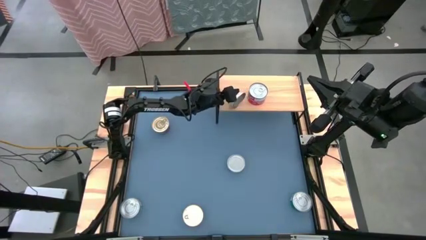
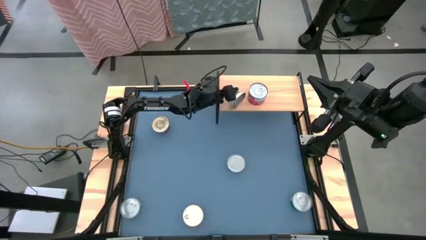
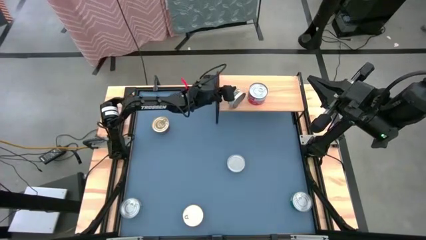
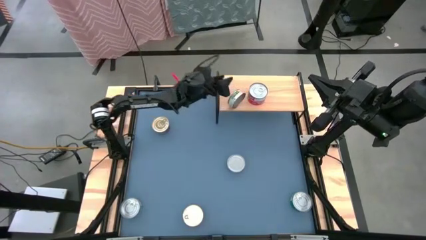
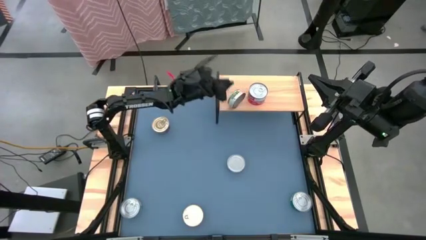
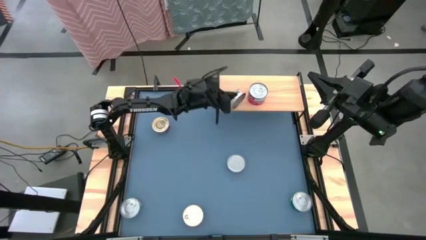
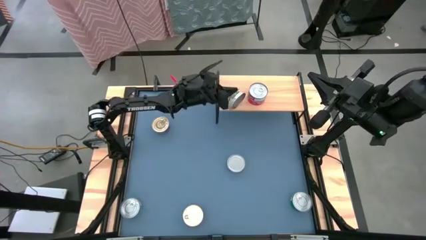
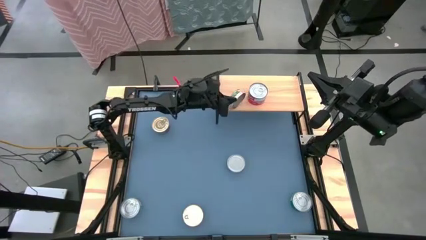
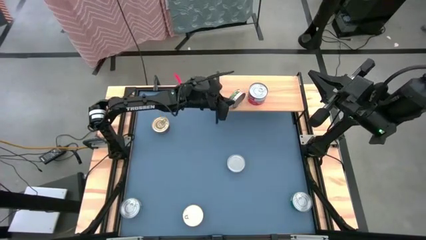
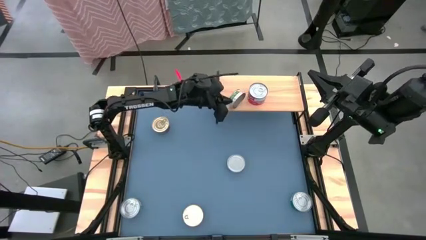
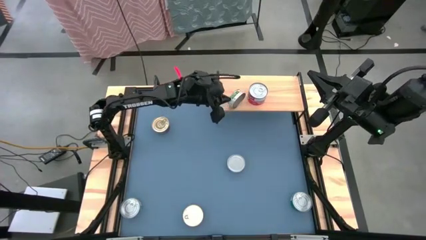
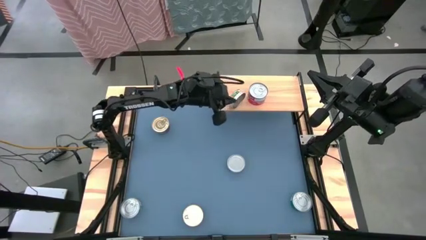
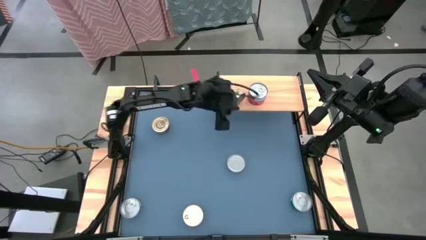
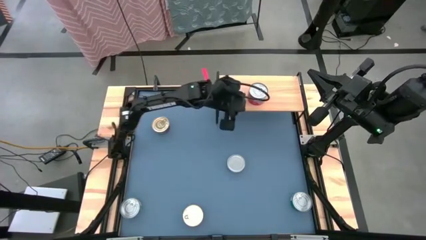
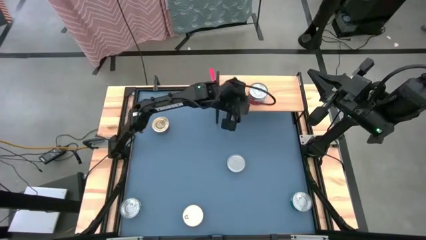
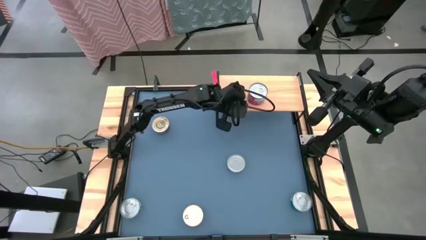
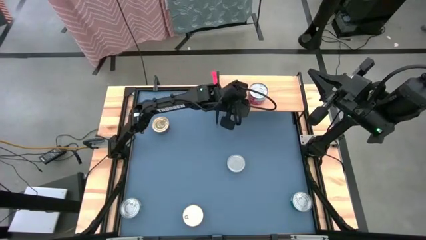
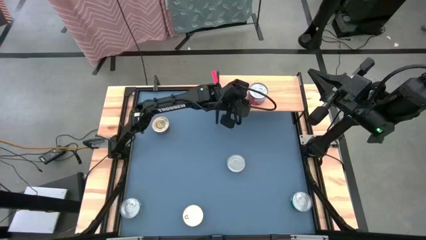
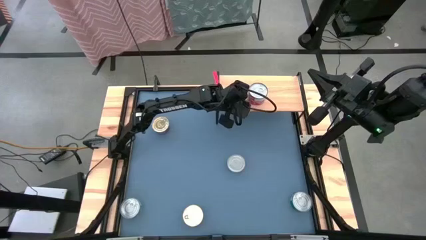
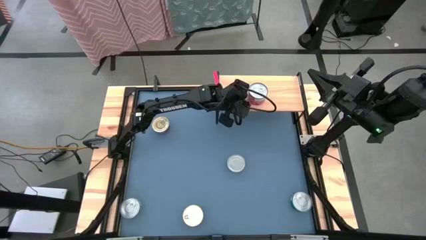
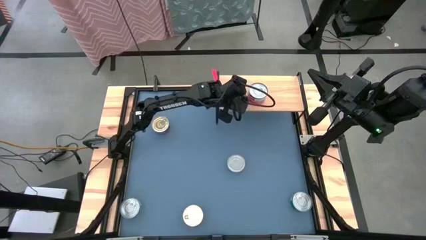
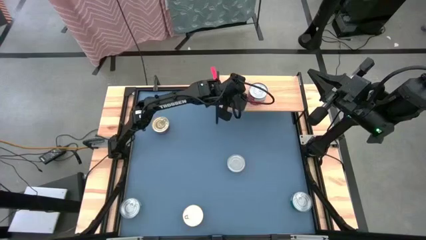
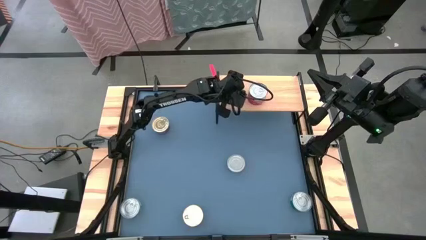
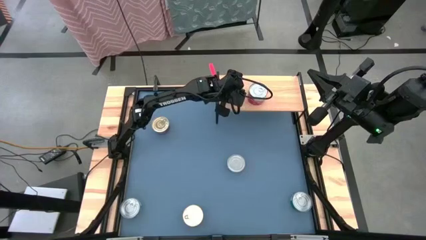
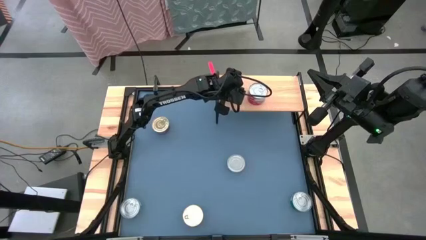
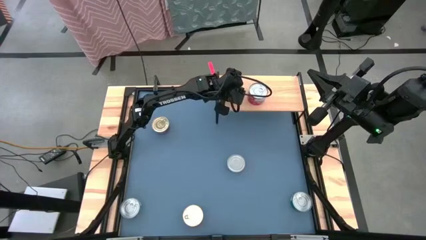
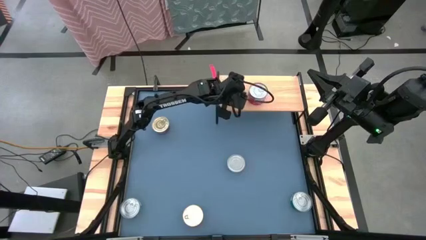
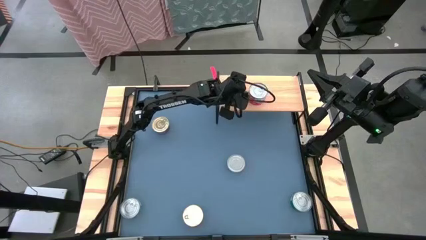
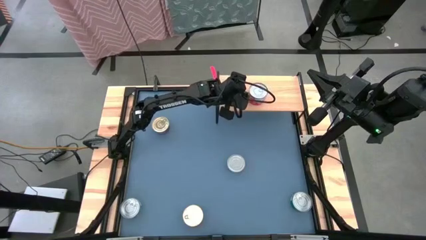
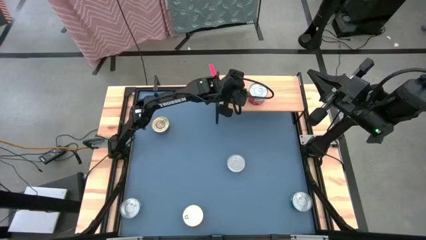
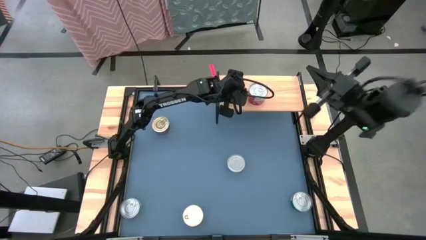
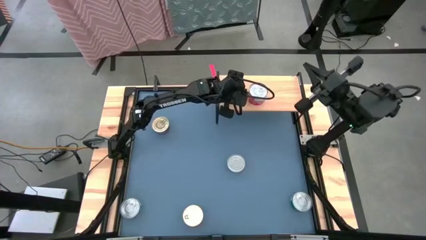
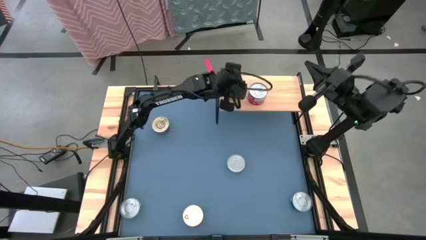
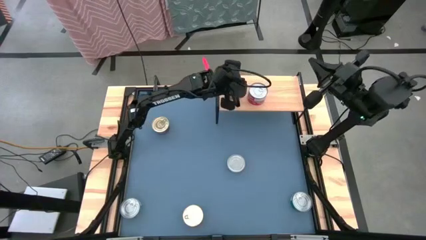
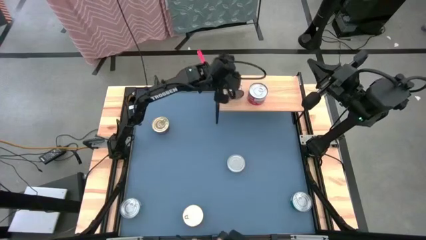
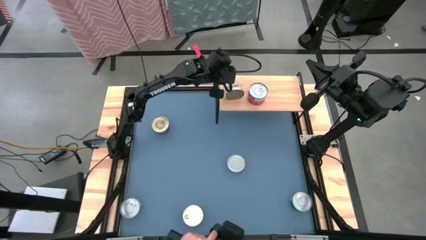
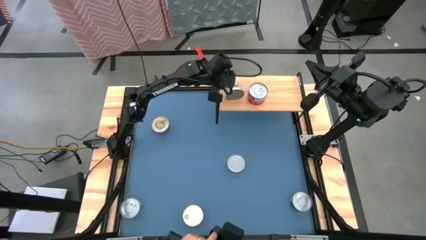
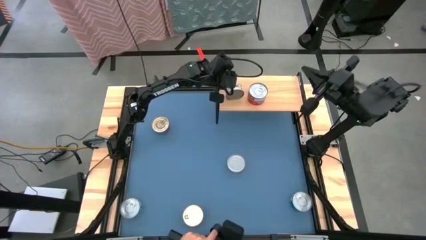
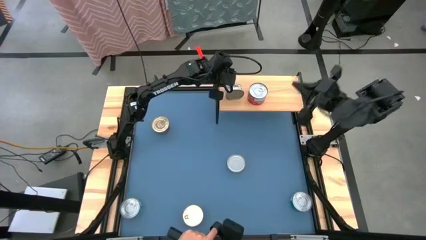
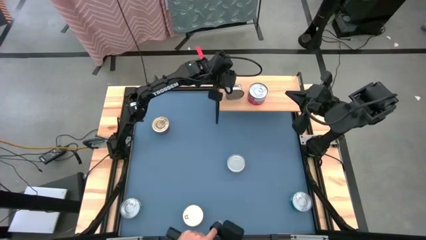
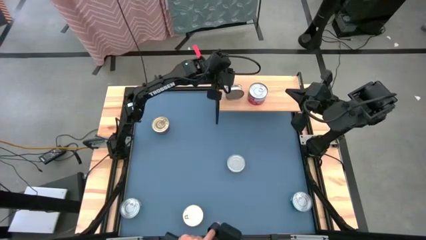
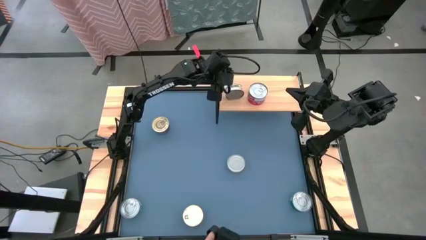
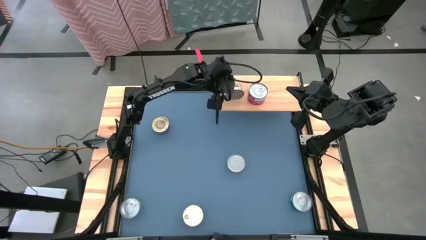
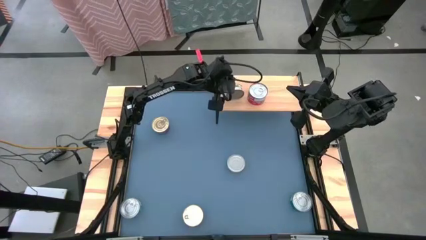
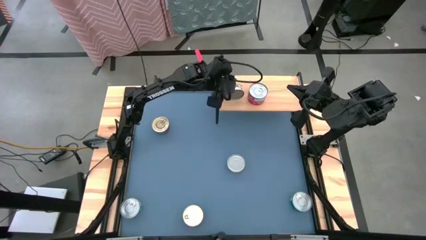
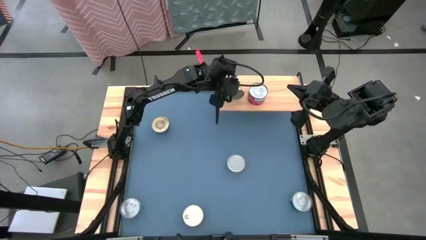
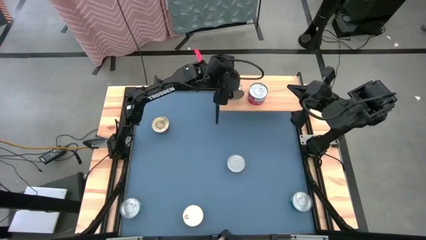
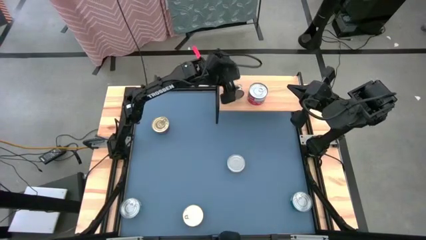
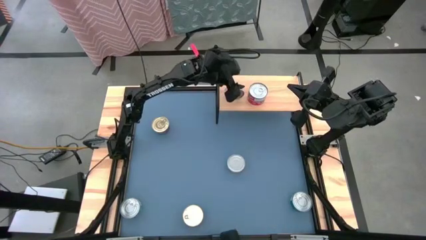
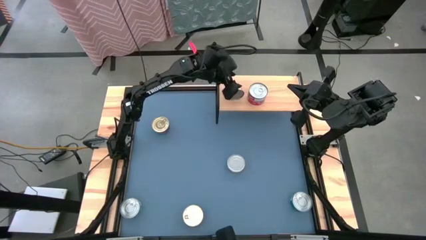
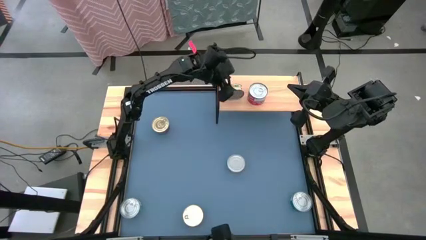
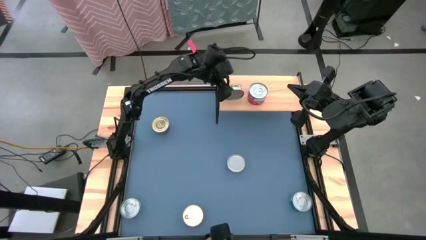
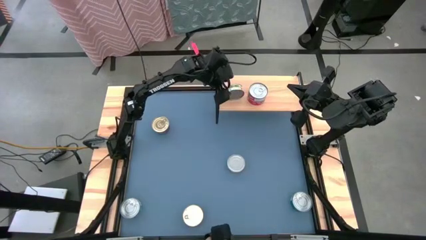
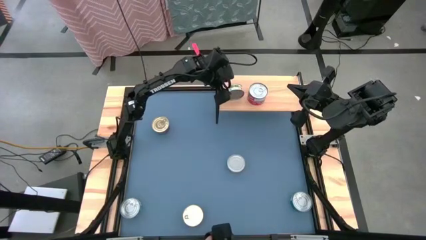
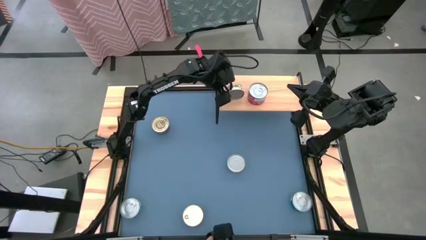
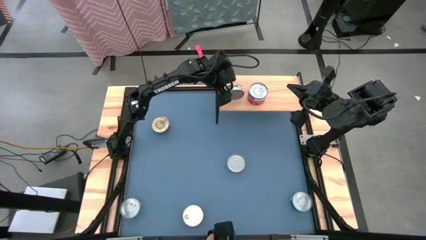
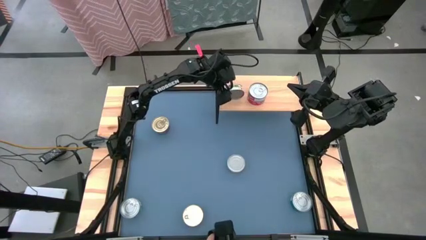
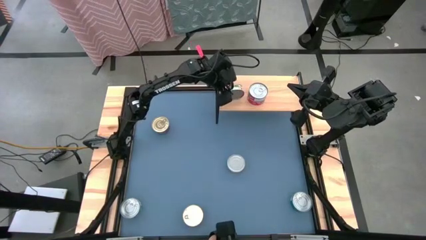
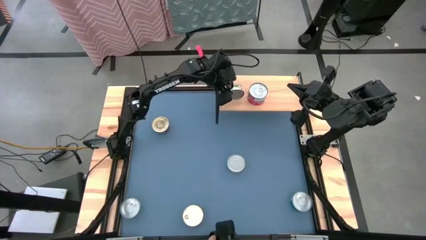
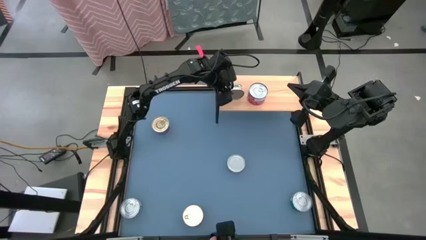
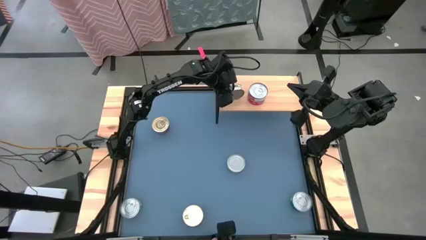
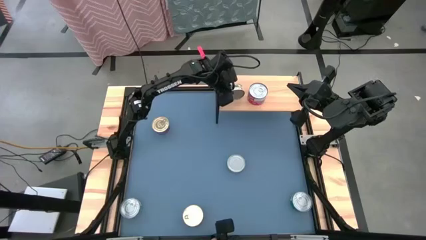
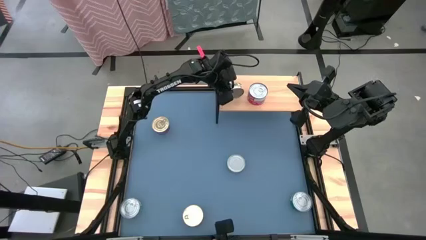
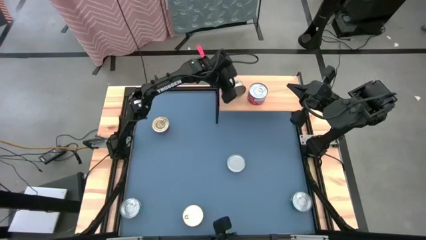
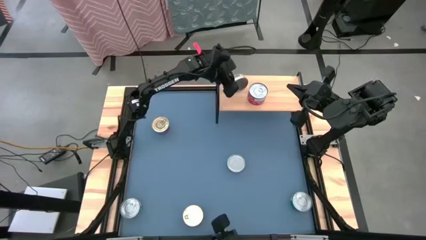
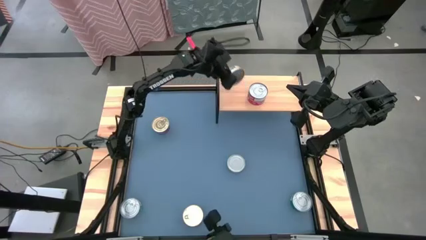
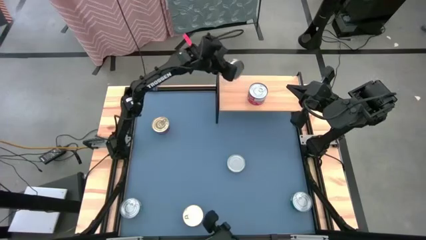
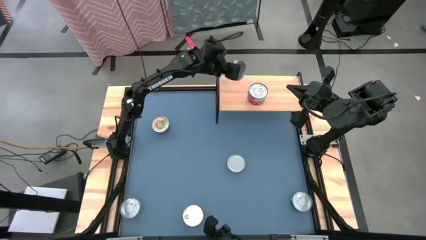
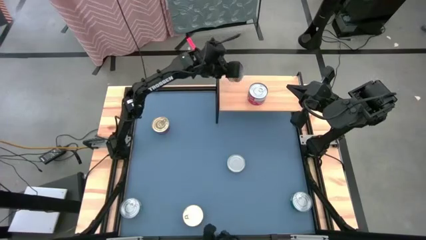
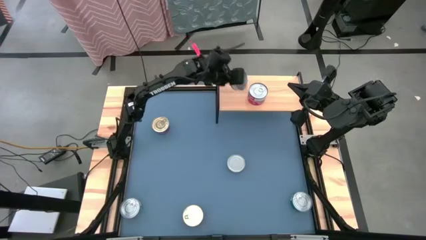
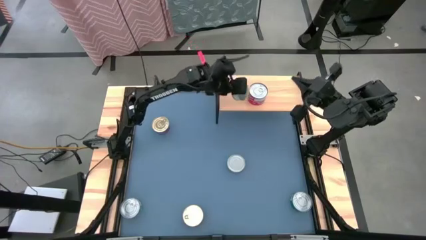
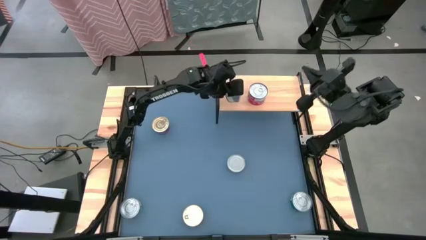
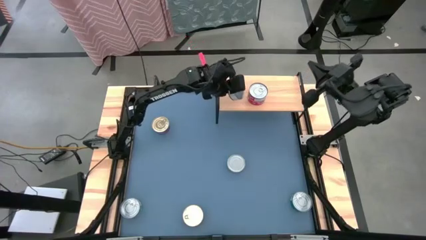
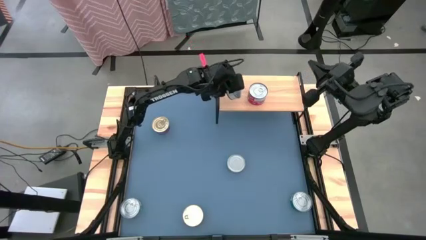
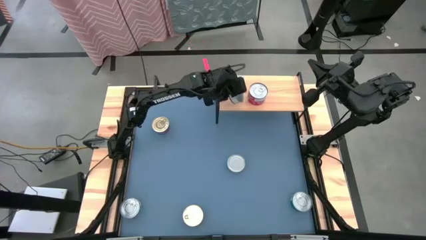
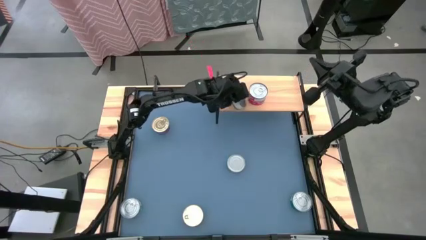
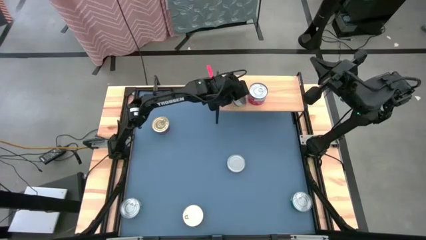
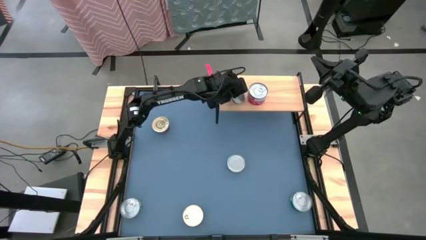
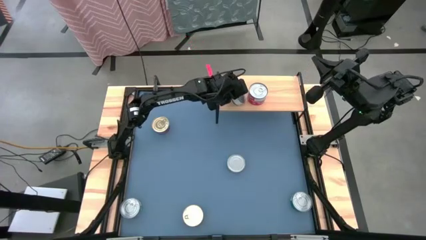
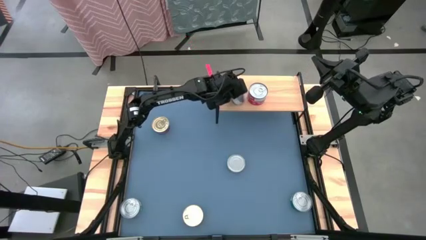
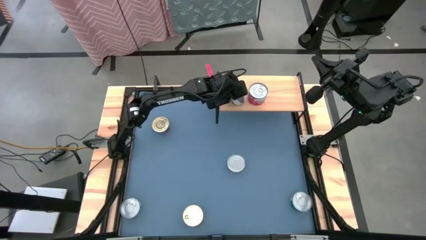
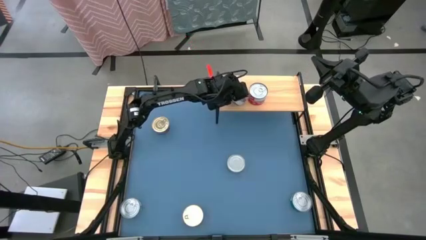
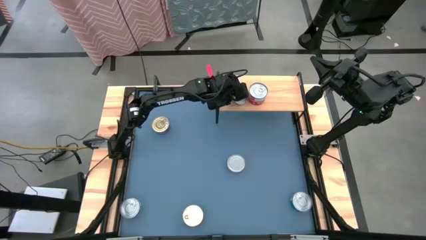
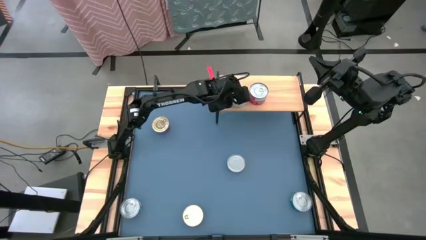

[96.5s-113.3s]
Task: Stack canned seafood by type on shelf
Put the top green tuna can on the shelf
